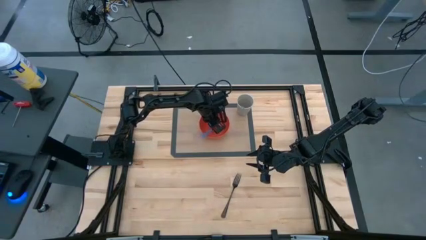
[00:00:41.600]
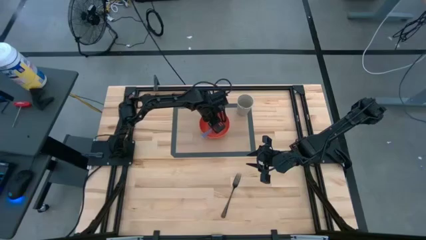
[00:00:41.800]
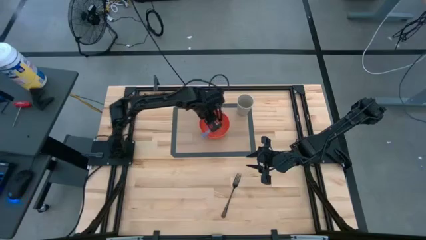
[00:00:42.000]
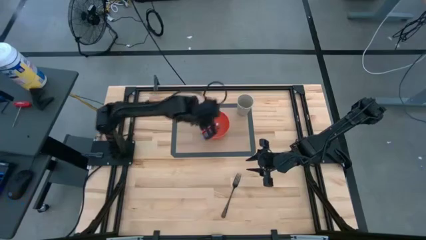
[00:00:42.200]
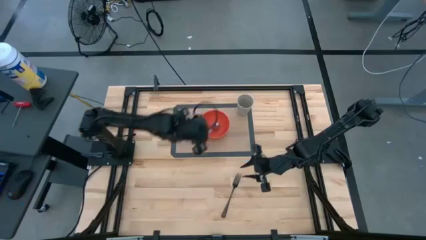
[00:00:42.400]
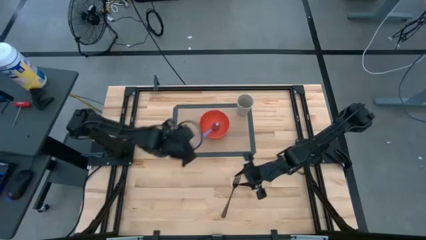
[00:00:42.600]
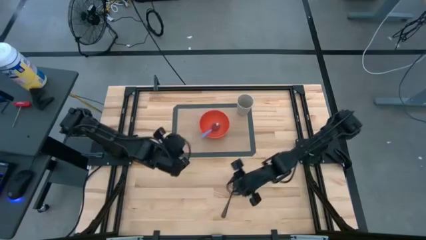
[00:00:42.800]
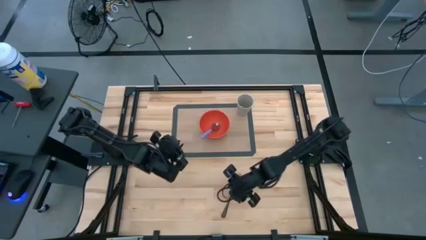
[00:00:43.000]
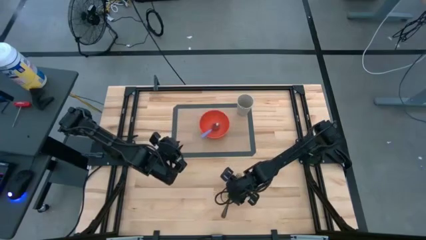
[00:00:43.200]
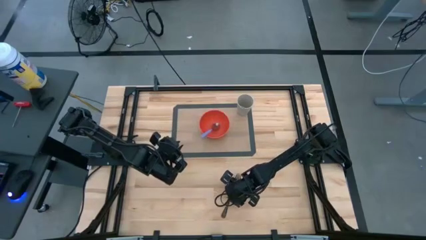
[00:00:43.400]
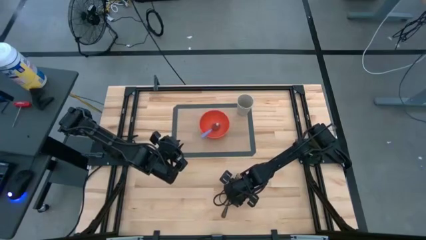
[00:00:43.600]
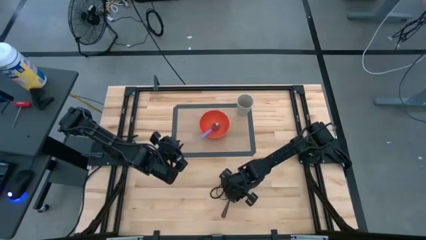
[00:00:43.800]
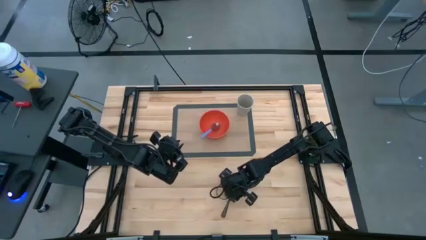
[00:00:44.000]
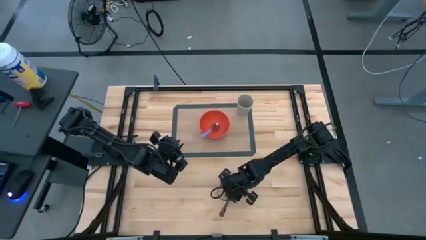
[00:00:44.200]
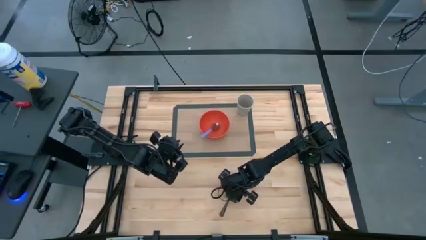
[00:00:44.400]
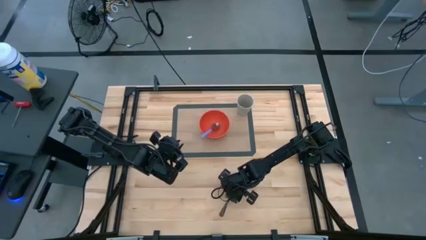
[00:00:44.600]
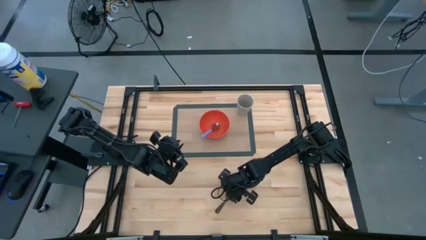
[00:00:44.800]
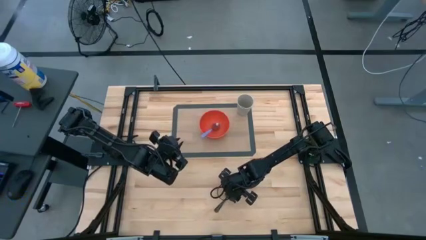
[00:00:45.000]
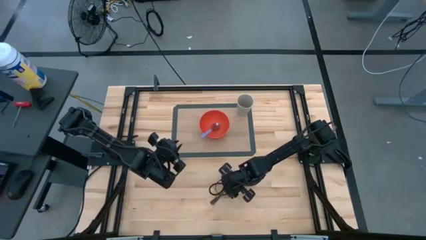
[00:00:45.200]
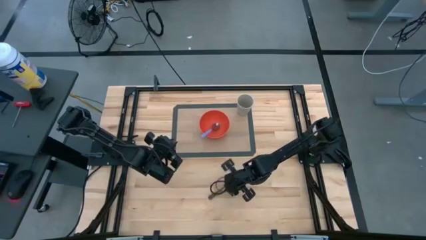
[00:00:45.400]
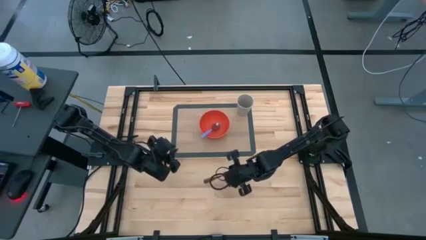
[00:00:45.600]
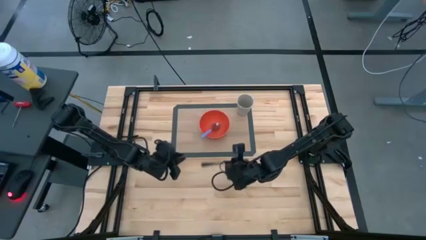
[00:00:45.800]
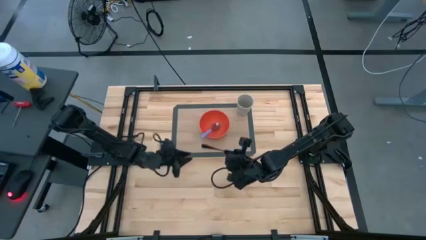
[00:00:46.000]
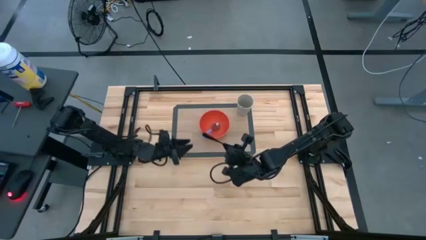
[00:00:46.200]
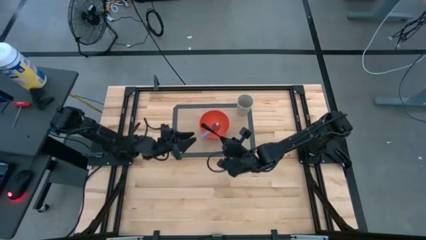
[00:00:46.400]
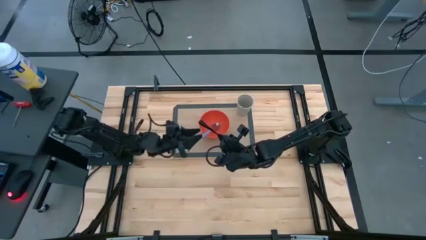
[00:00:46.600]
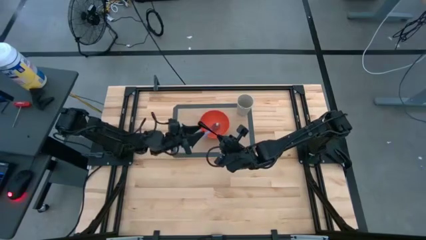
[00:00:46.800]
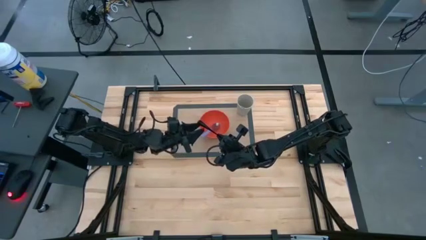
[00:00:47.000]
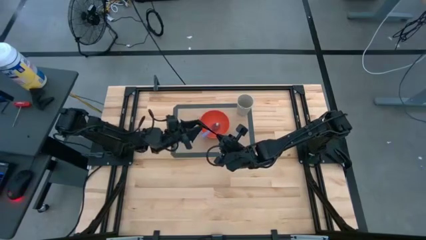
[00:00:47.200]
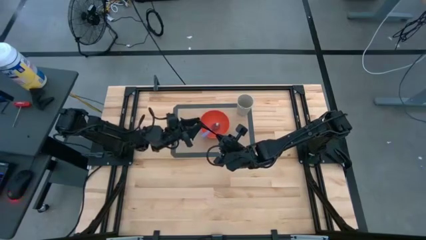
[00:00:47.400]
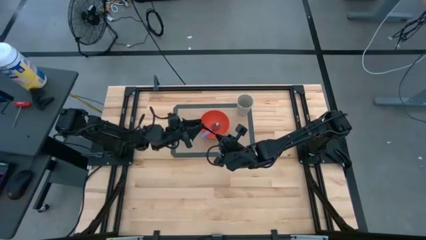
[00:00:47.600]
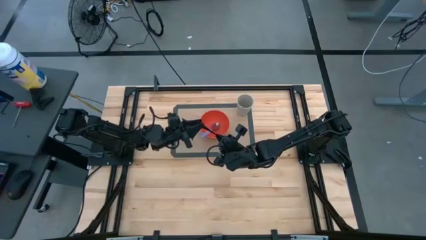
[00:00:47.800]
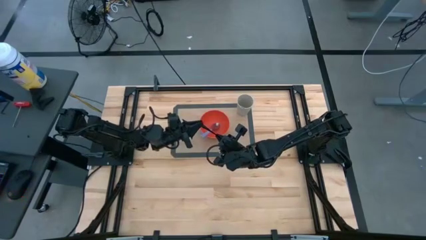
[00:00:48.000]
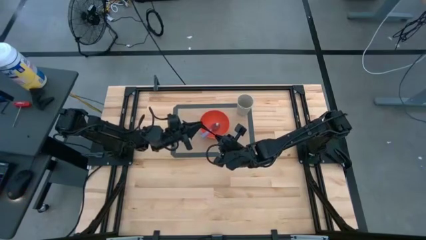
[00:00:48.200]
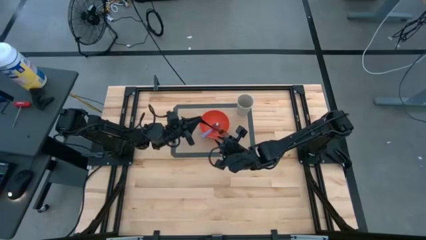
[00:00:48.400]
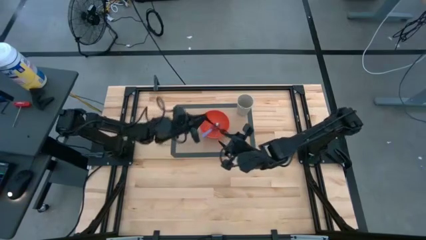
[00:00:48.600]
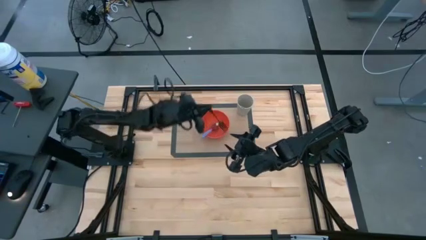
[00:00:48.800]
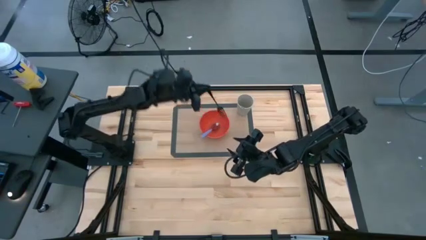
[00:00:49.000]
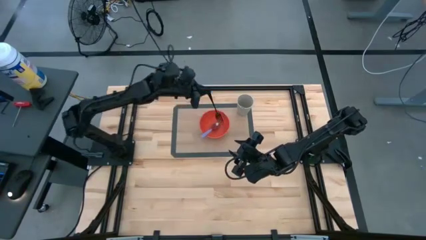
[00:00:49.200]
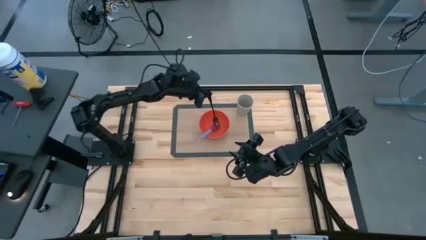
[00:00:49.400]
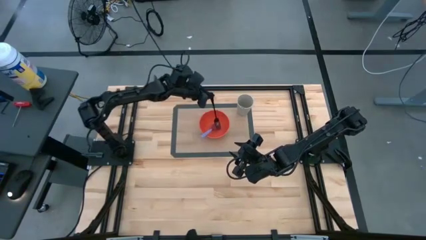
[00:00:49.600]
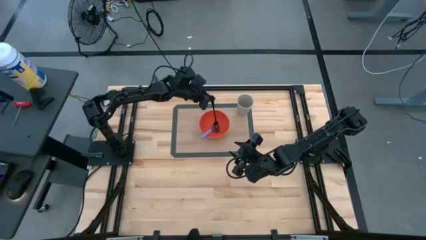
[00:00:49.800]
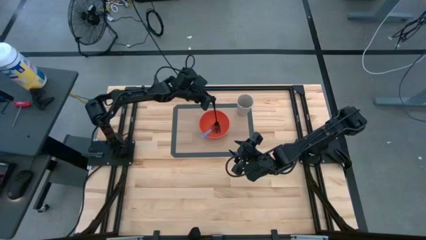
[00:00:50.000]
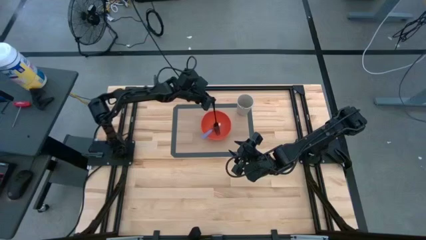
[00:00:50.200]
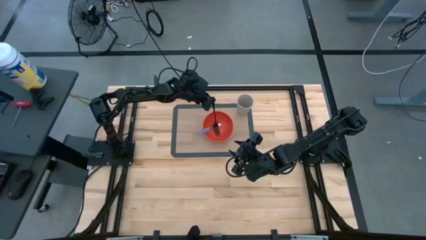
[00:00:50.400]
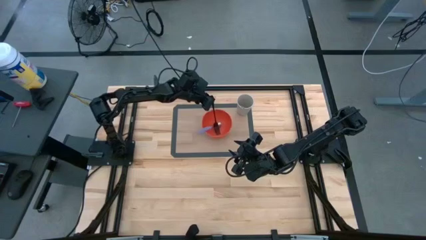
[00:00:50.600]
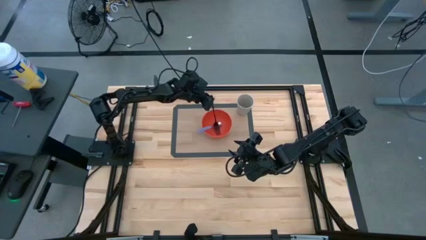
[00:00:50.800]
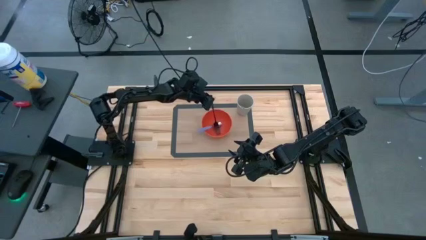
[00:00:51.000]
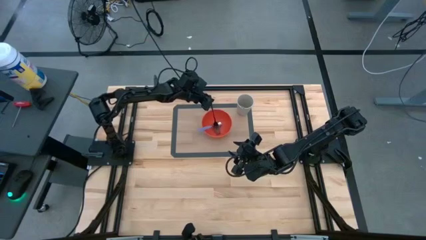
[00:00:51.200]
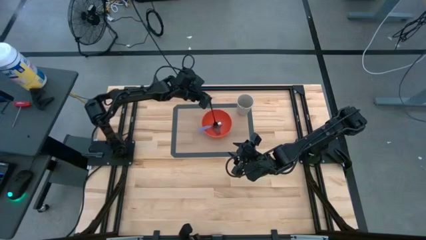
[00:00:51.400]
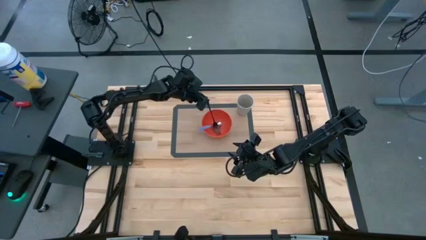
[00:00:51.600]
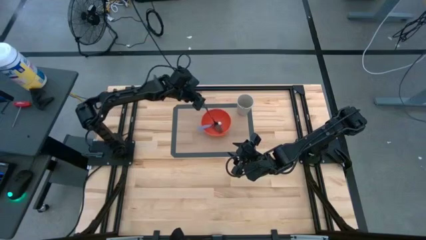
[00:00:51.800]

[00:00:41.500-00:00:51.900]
Task: Pick & Place Utensil
Put the black fork into the orange bowl

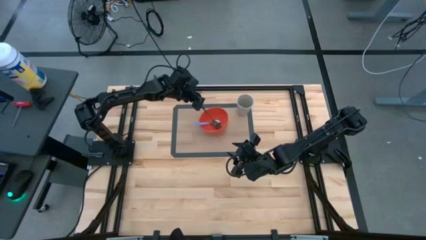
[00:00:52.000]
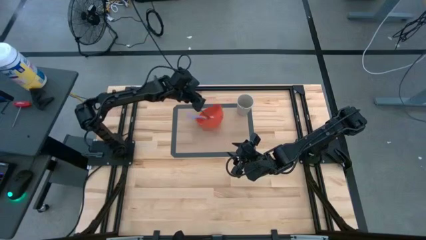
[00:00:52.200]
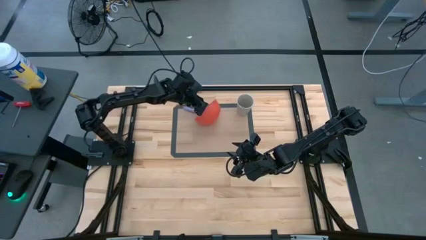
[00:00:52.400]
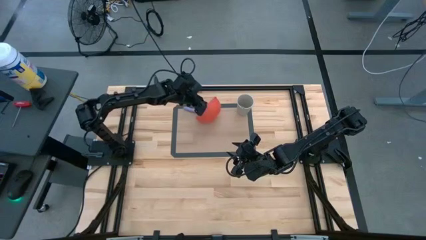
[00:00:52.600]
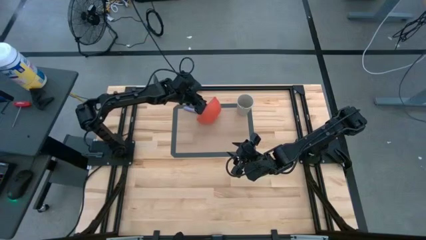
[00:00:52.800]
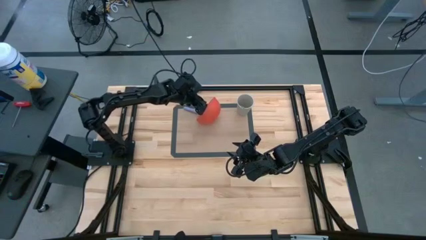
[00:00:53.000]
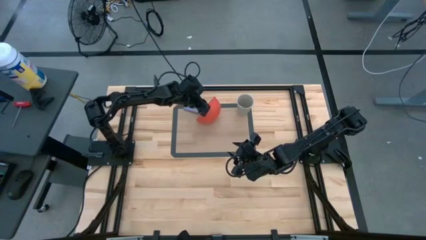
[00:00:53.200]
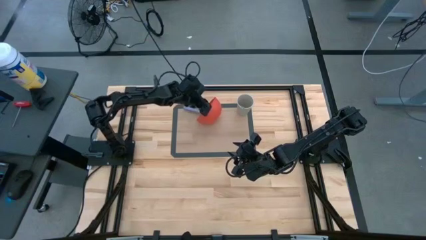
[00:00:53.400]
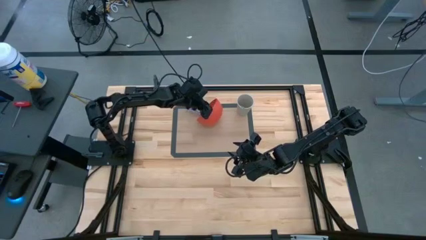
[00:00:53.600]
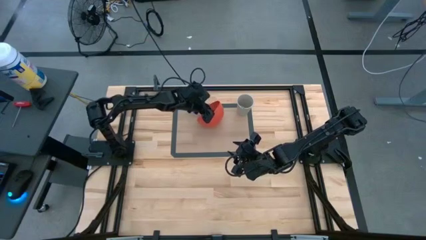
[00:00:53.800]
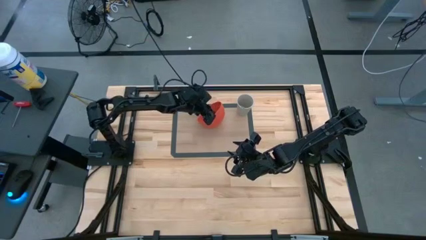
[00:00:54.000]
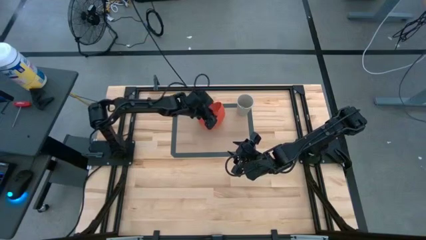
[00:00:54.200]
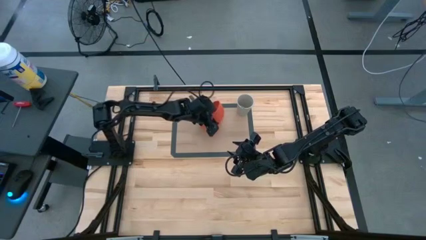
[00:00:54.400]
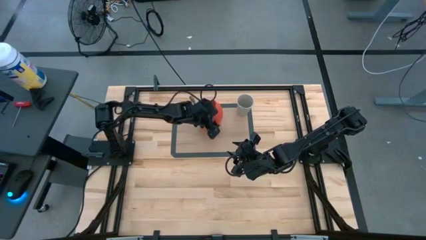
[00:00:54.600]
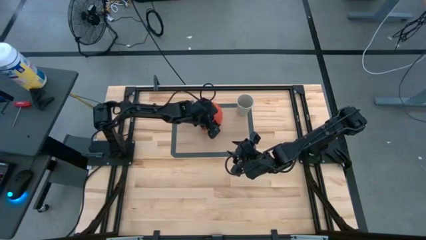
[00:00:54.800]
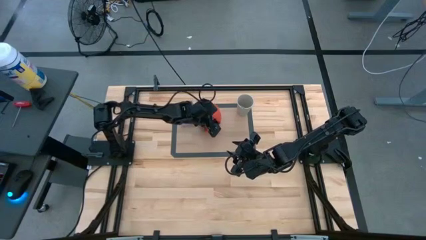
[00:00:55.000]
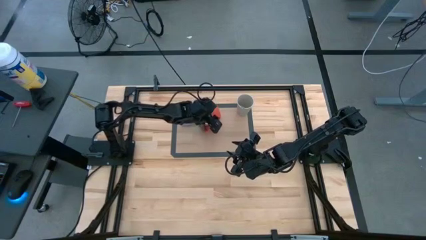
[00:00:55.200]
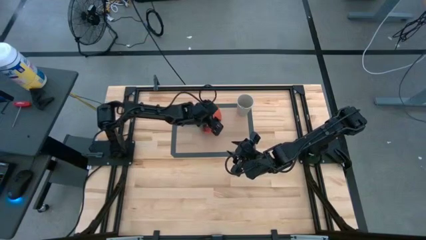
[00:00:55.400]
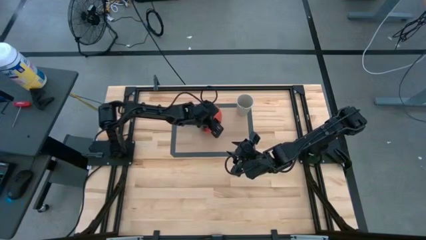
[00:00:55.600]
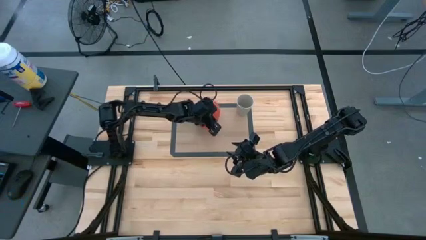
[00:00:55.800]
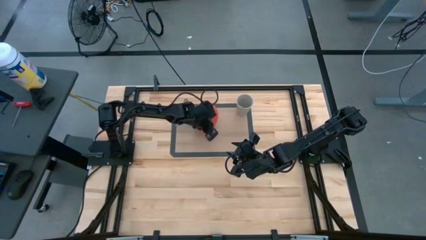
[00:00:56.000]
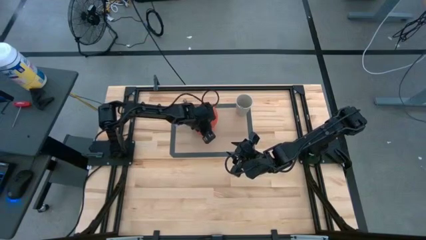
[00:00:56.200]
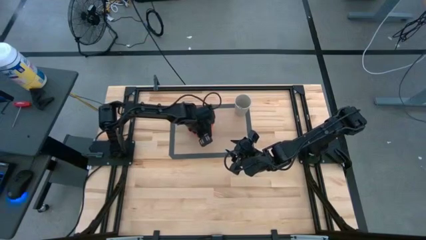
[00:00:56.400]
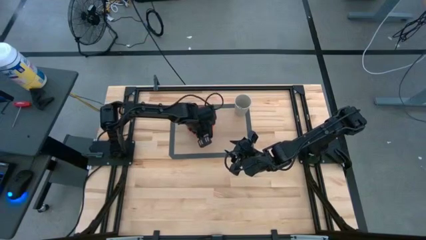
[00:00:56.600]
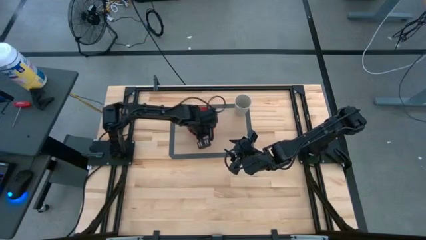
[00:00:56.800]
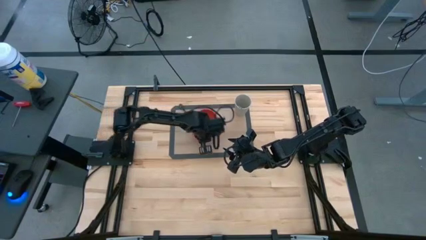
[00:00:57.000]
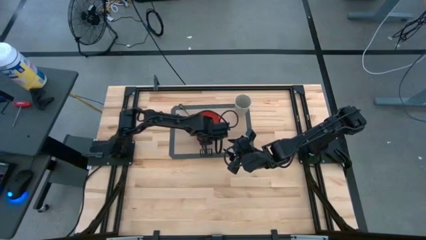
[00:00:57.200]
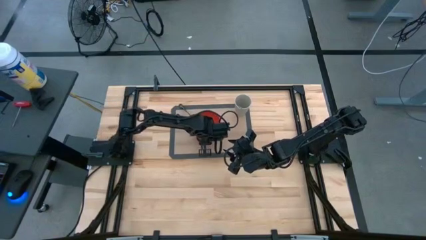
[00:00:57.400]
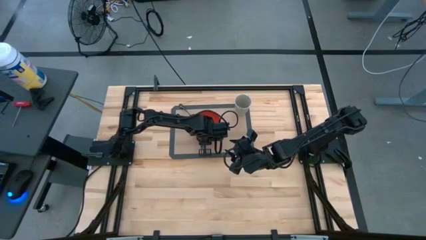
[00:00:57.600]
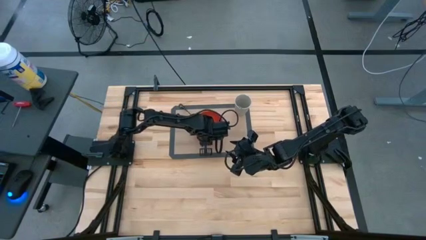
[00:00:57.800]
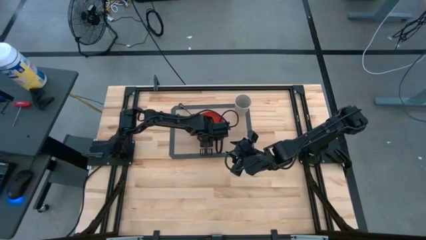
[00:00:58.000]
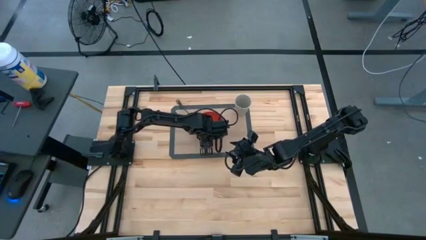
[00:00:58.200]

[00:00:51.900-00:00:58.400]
Adjust the orange bowl
